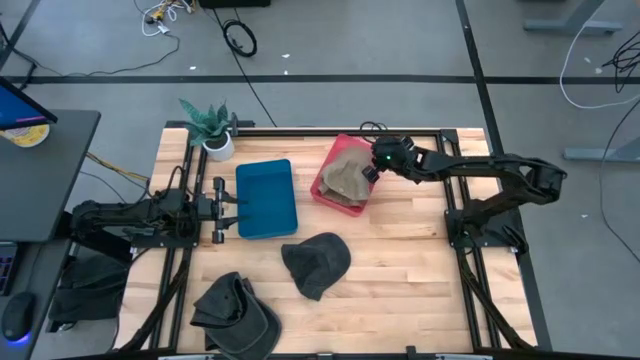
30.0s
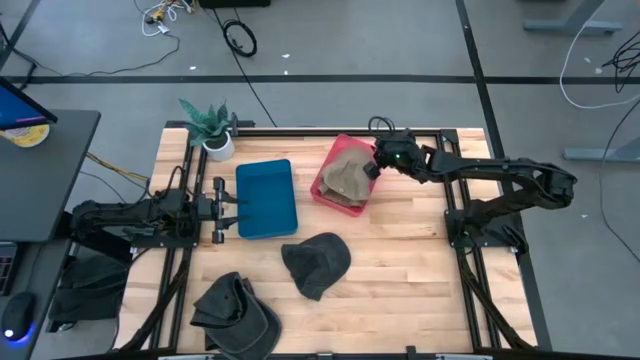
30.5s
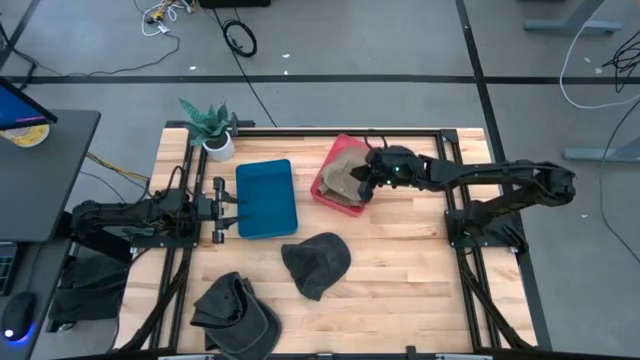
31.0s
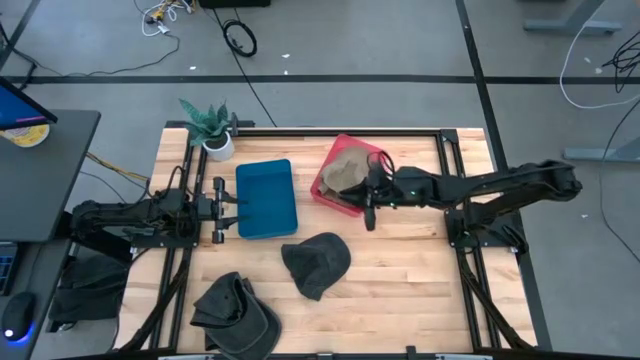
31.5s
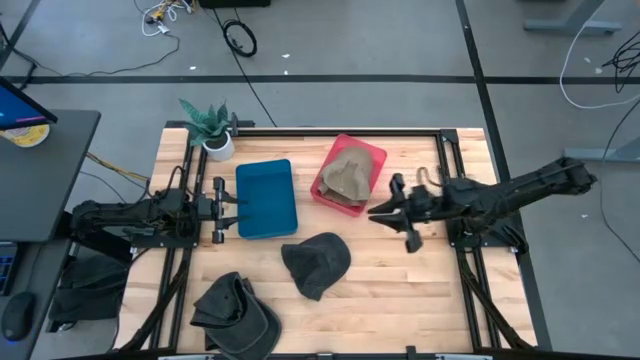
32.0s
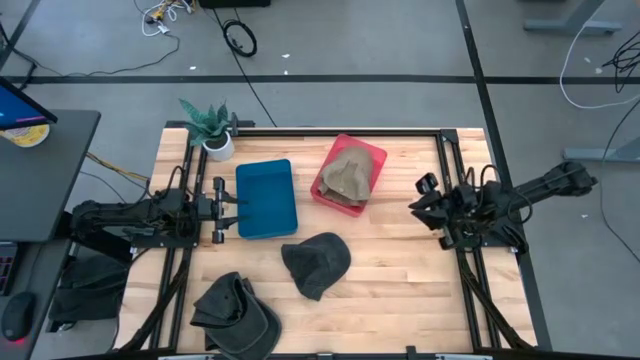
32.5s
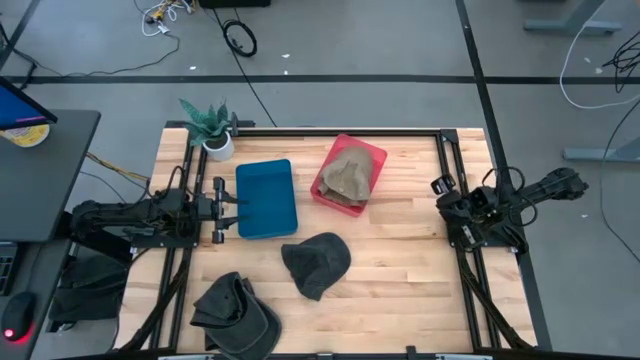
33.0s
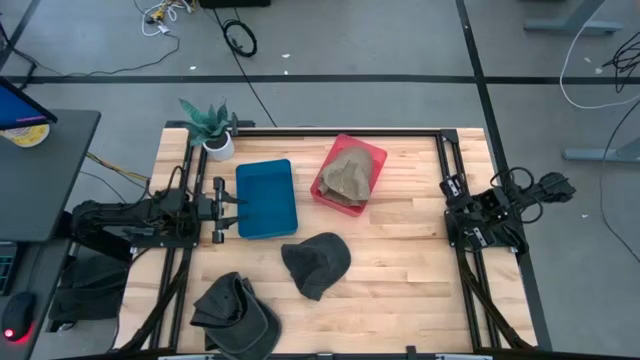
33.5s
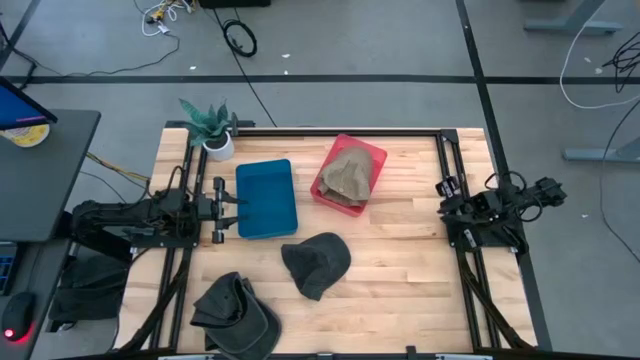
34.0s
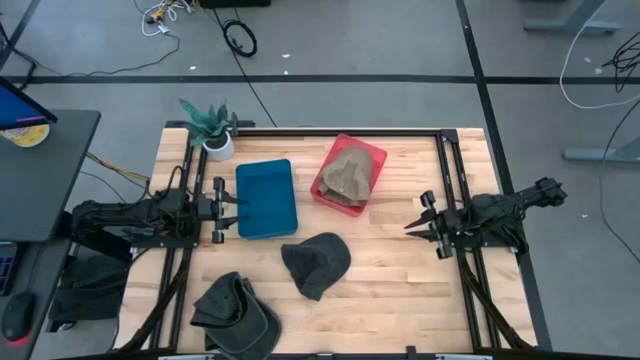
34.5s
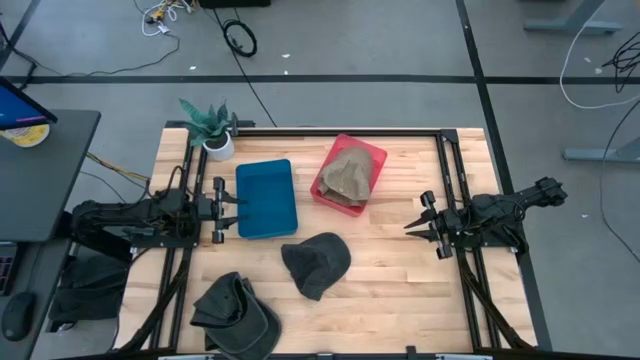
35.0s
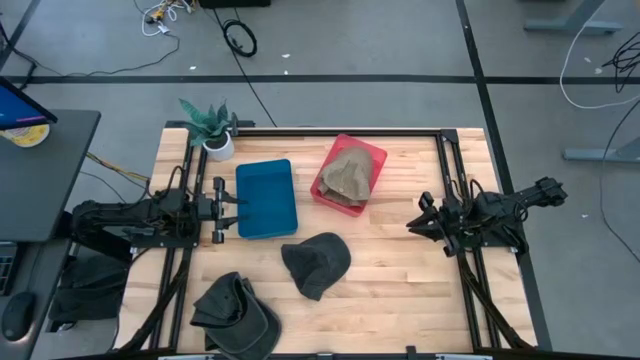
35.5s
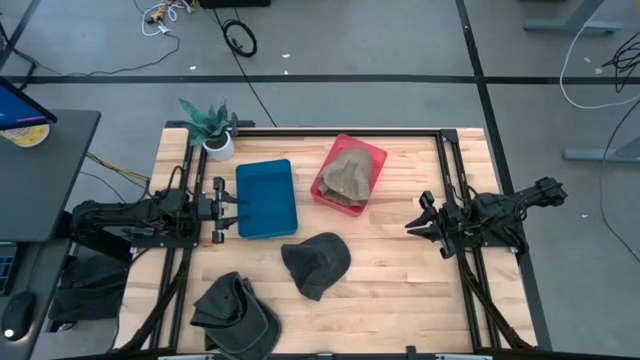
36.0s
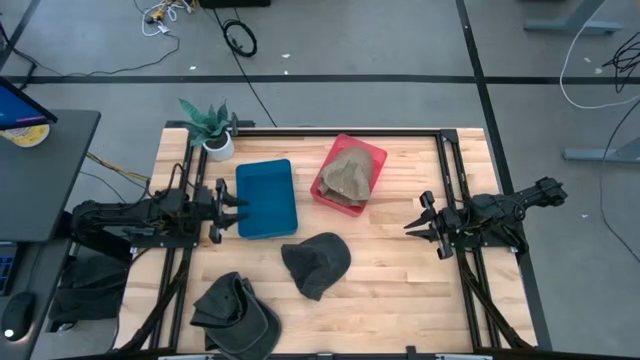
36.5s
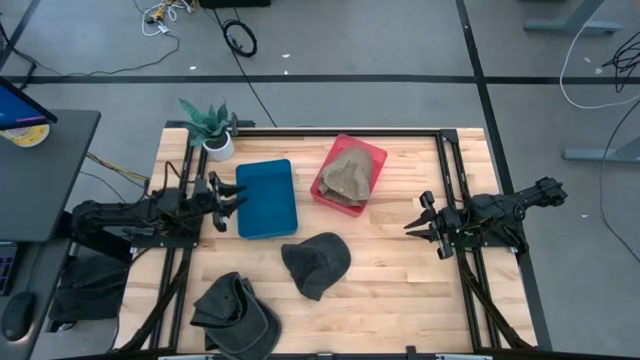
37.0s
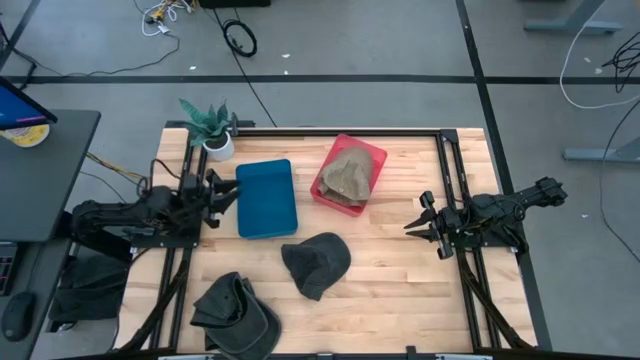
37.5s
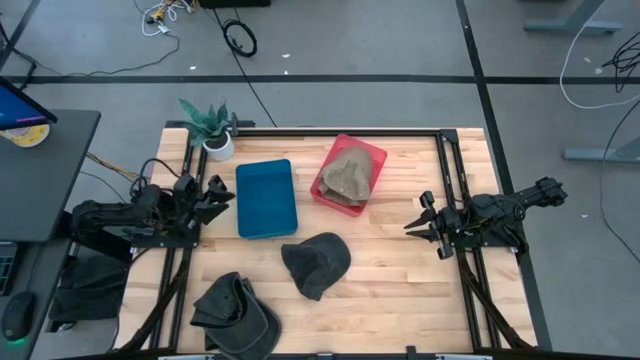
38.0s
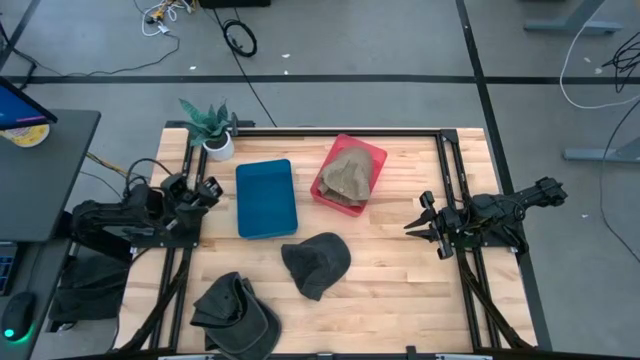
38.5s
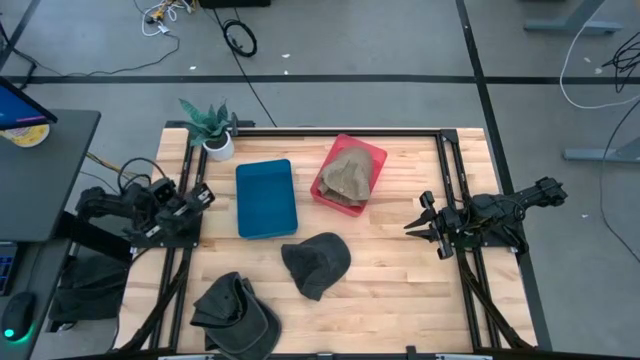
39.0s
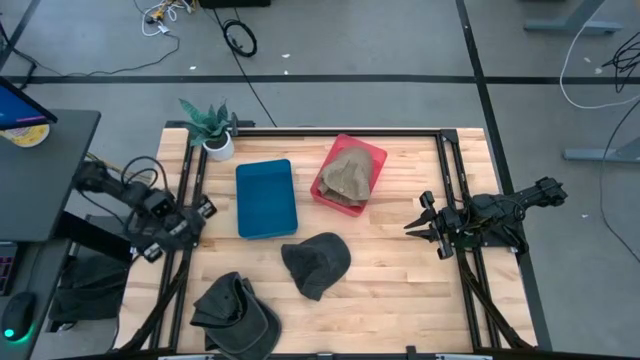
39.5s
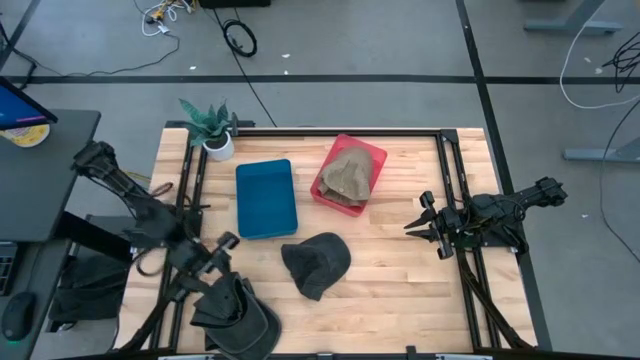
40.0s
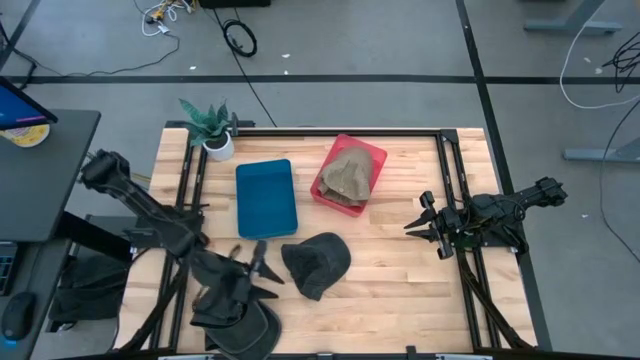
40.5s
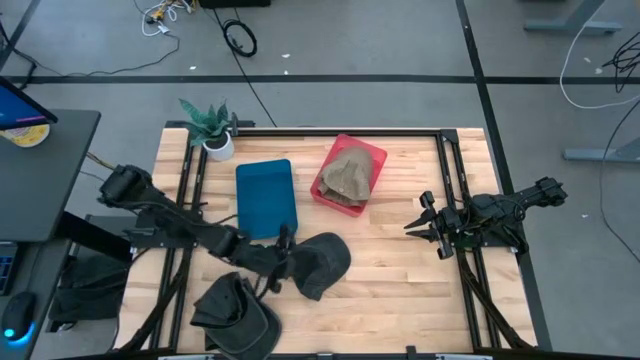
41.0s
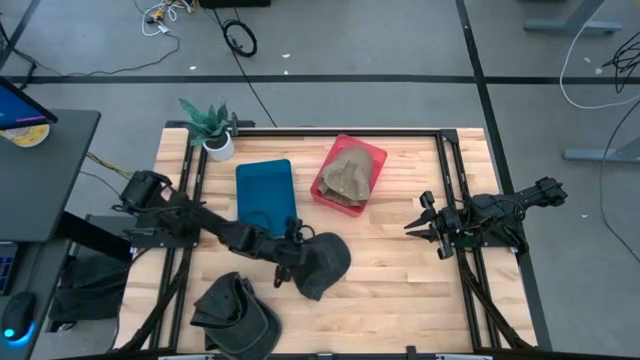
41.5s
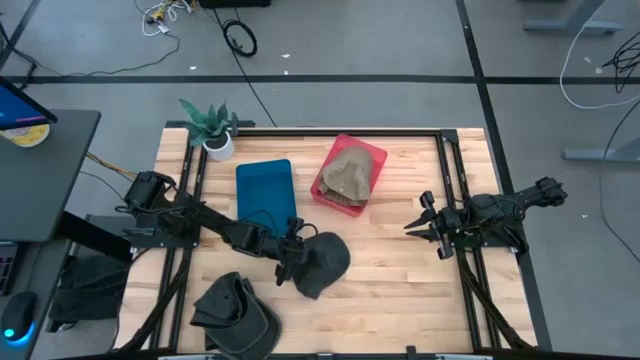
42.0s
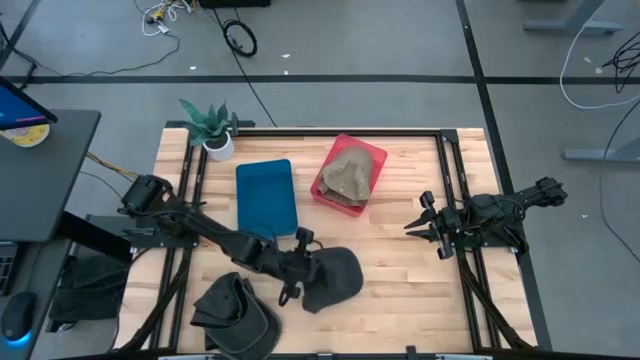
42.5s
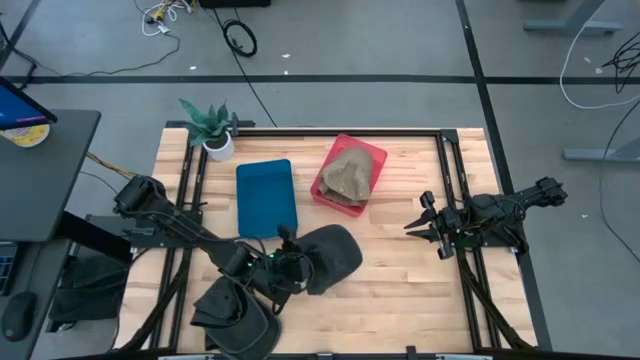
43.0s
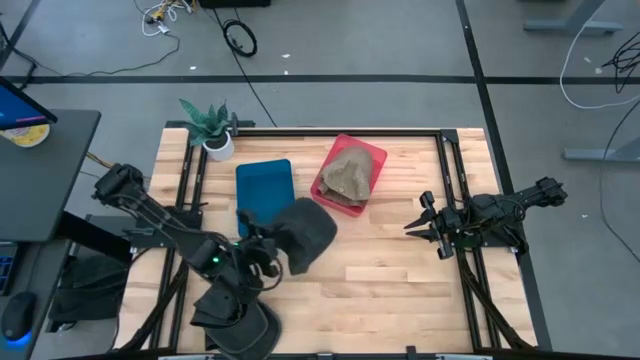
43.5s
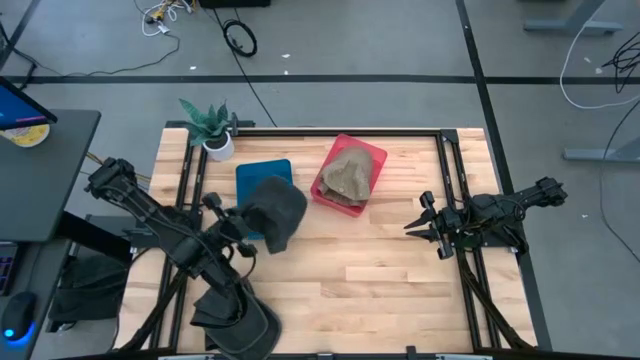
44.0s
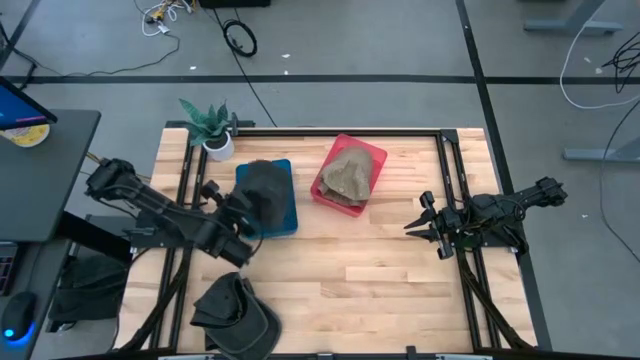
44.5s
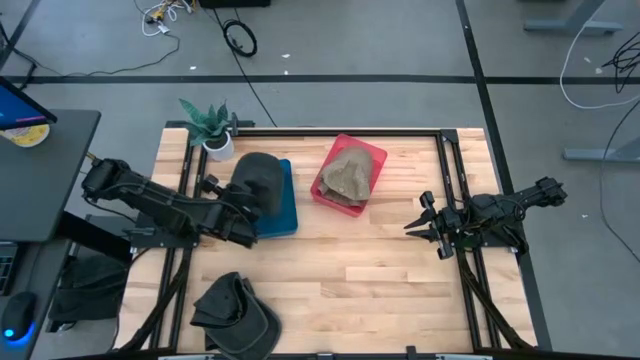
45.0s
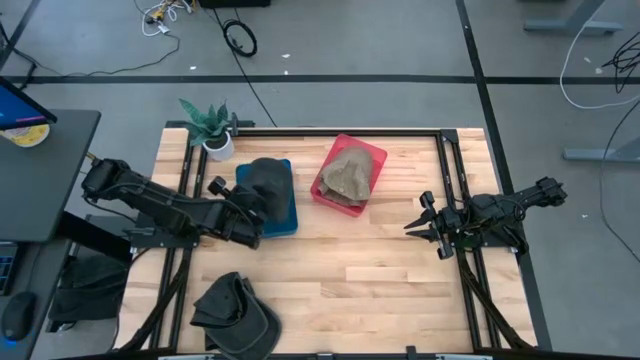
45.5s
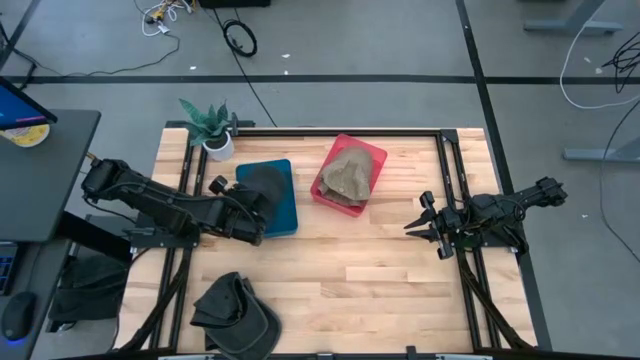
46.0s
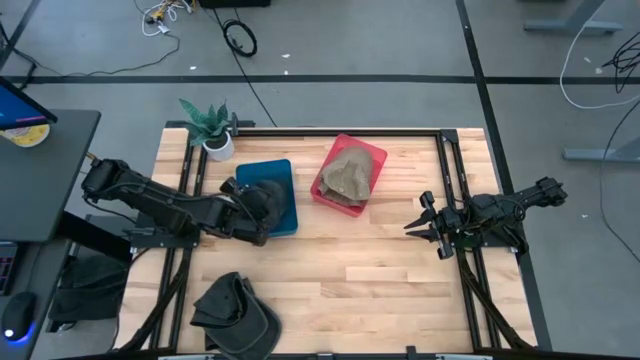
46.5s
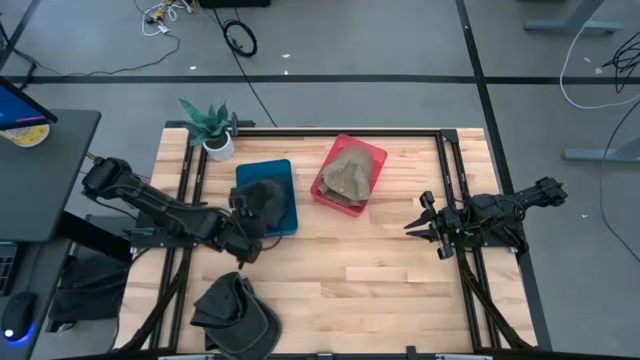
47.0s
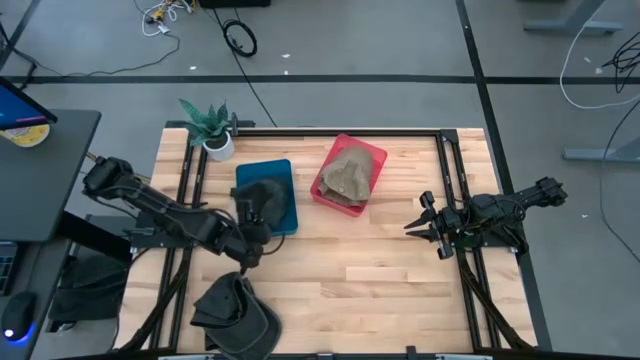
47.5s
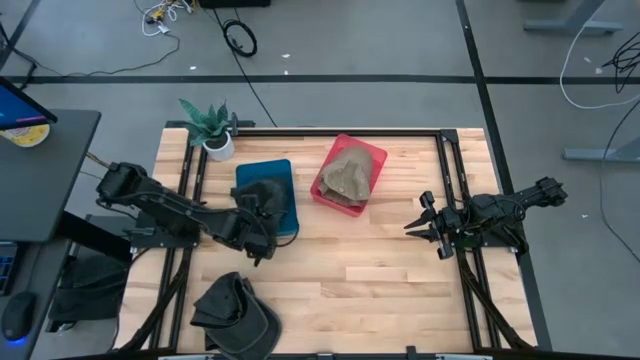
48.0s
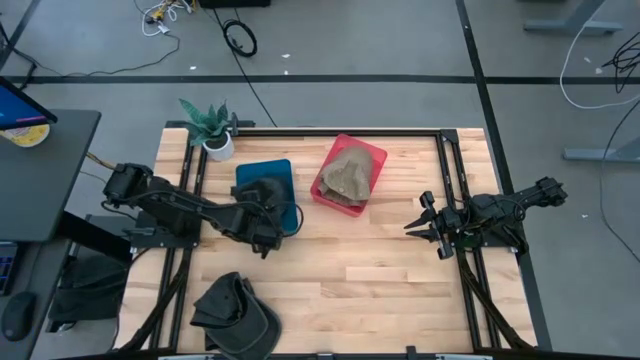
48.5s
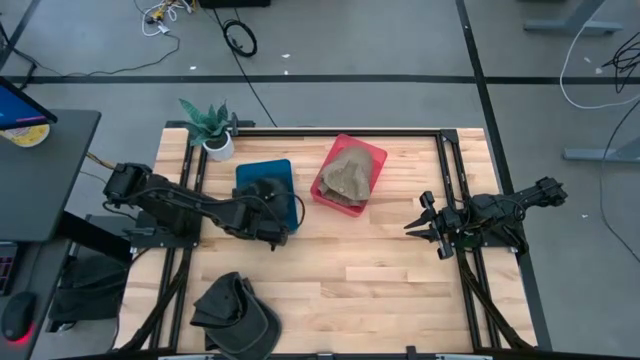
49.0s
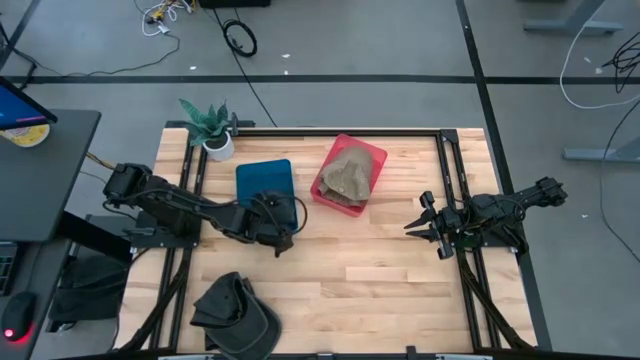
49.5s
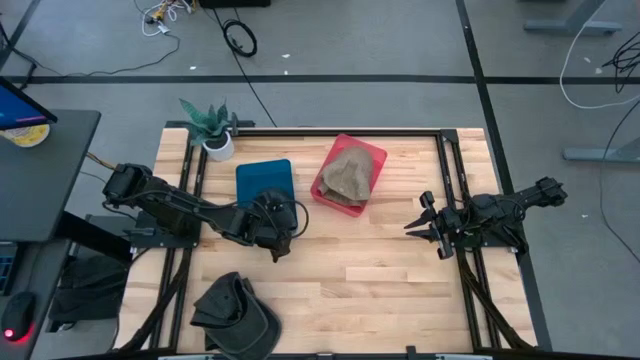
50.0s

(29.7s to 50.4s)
Task: Pick & Place hat
Put the top right black cap into the blue bin
